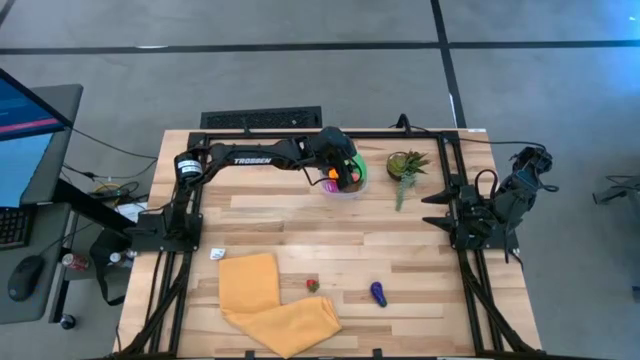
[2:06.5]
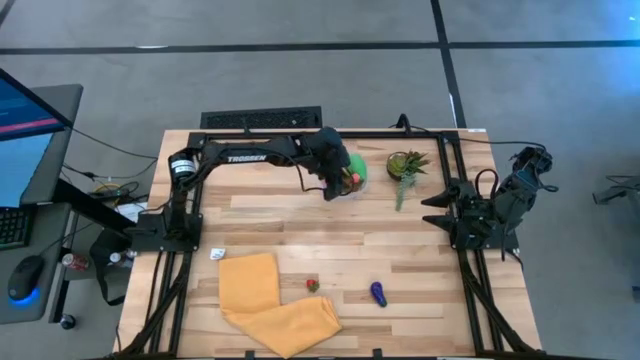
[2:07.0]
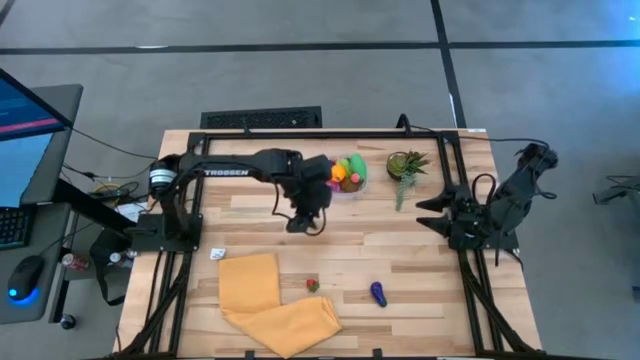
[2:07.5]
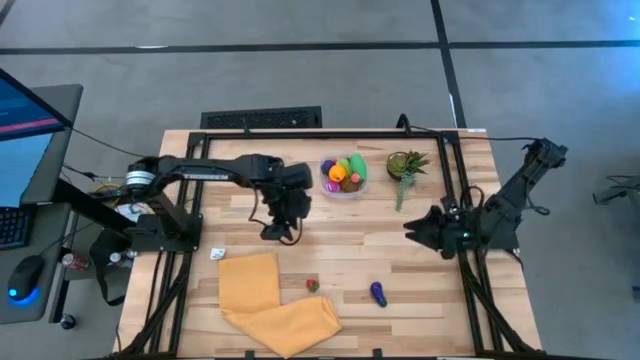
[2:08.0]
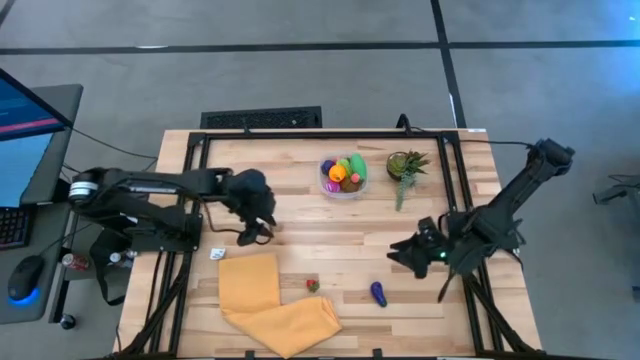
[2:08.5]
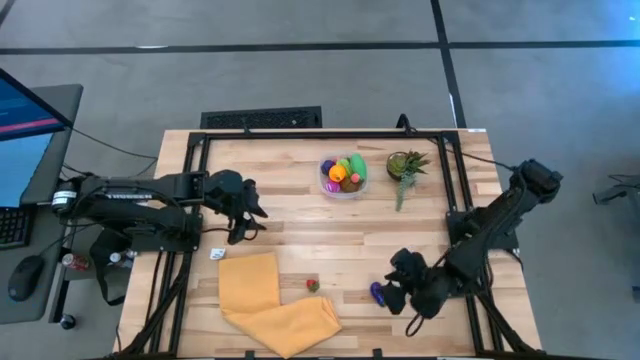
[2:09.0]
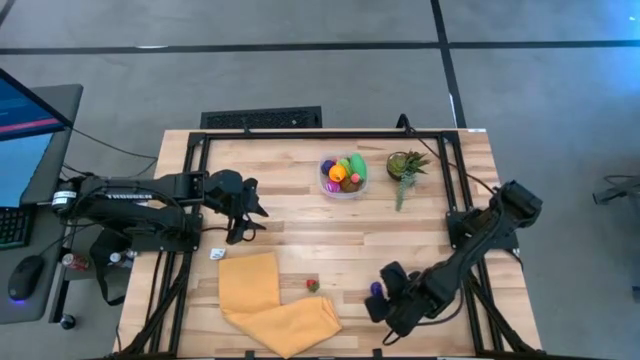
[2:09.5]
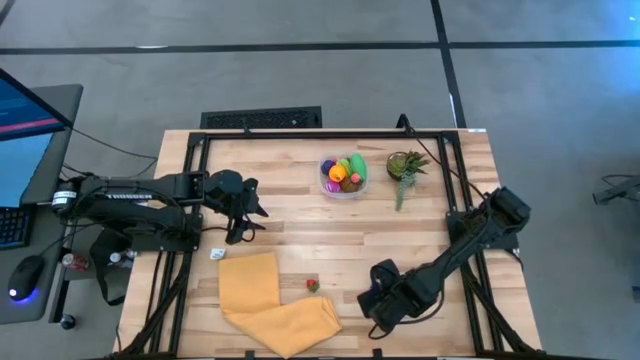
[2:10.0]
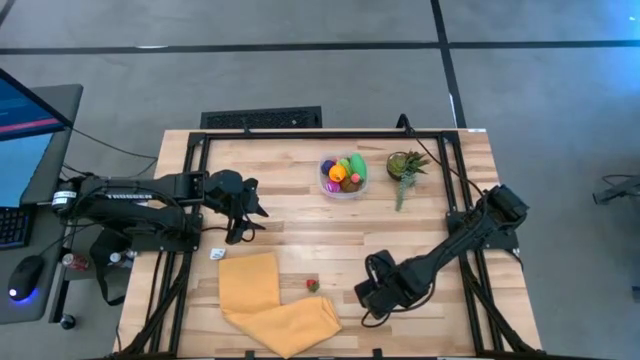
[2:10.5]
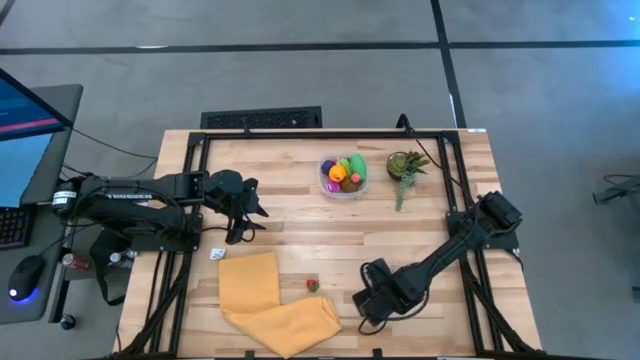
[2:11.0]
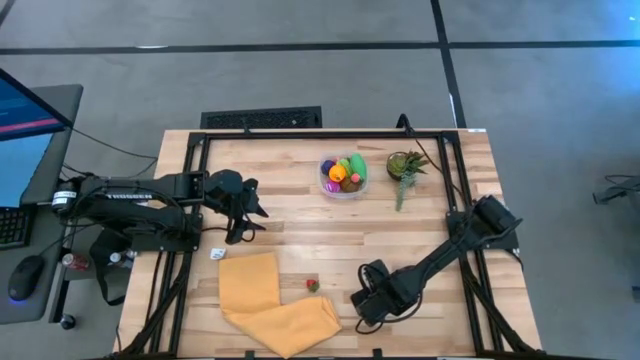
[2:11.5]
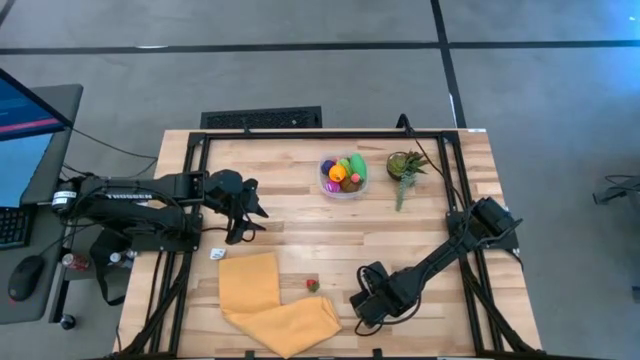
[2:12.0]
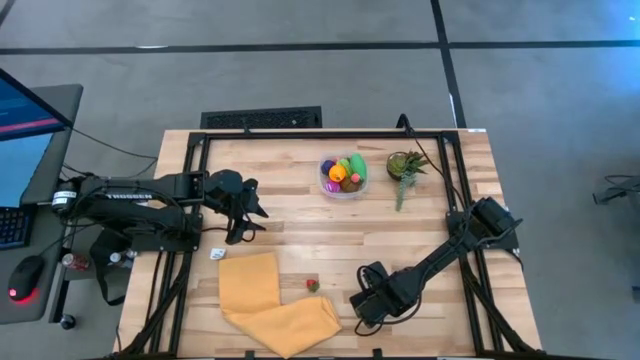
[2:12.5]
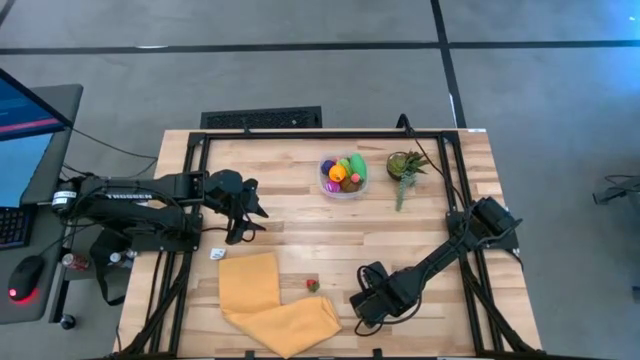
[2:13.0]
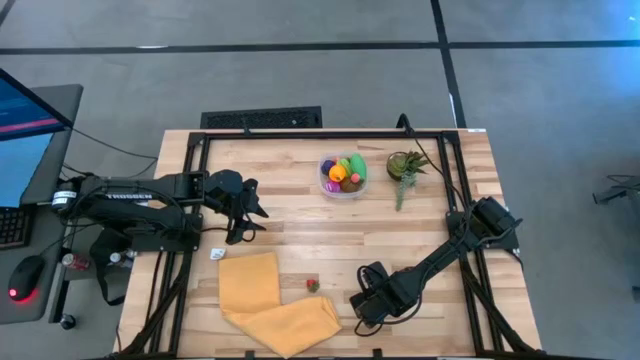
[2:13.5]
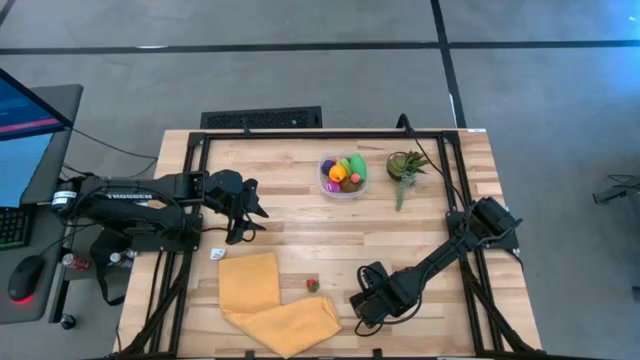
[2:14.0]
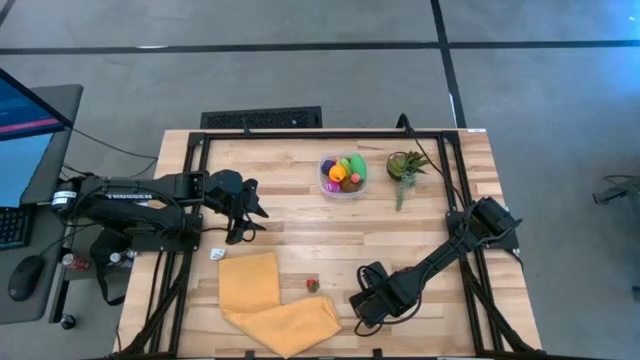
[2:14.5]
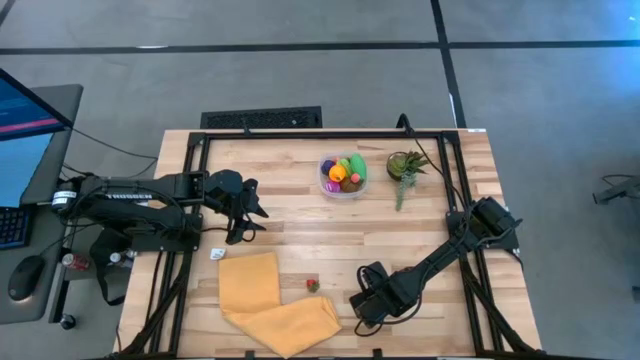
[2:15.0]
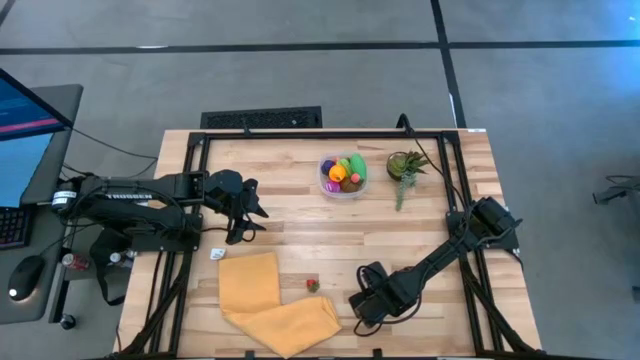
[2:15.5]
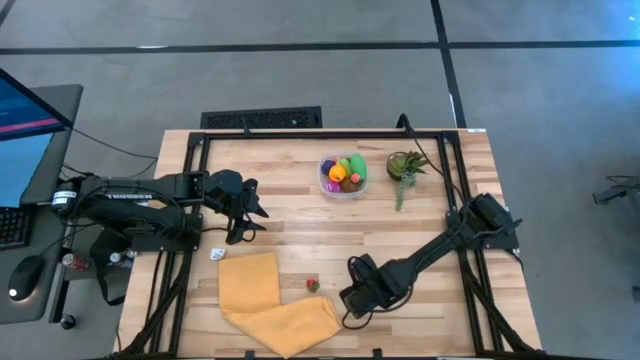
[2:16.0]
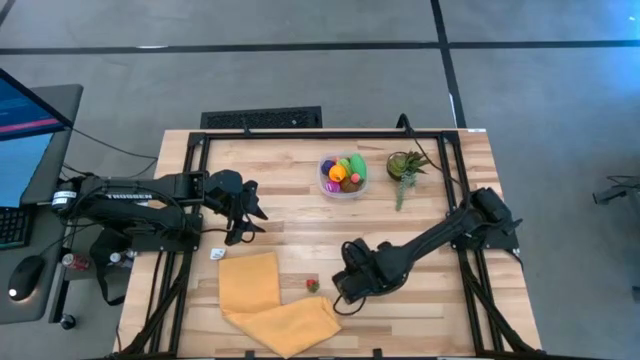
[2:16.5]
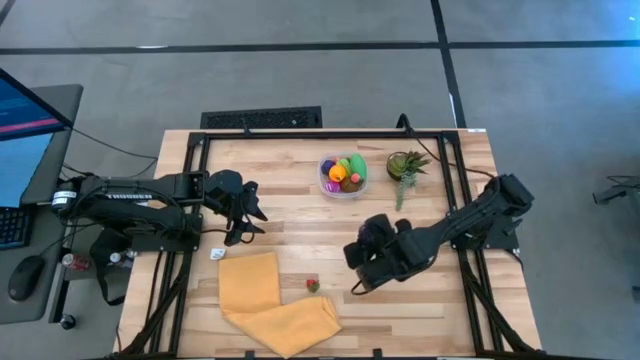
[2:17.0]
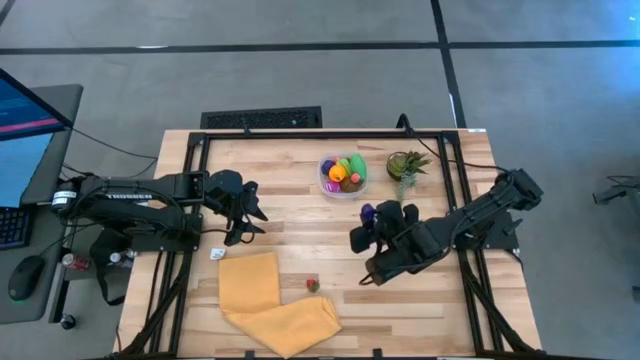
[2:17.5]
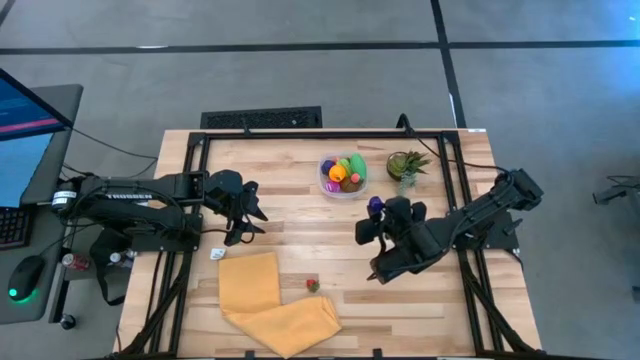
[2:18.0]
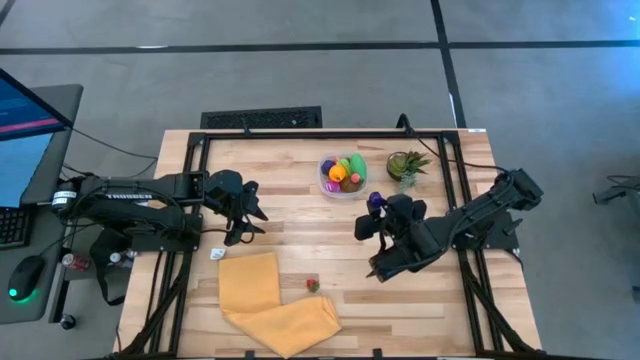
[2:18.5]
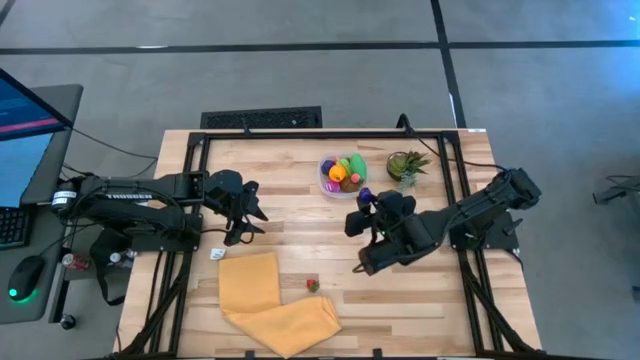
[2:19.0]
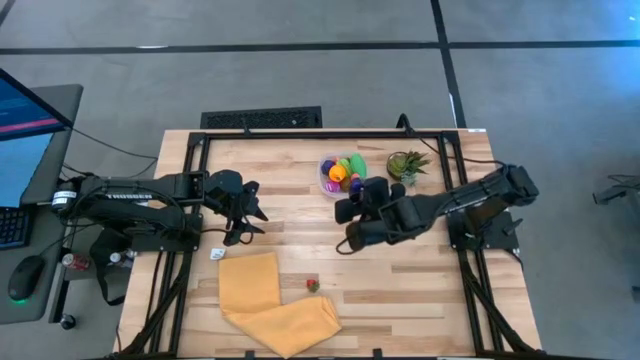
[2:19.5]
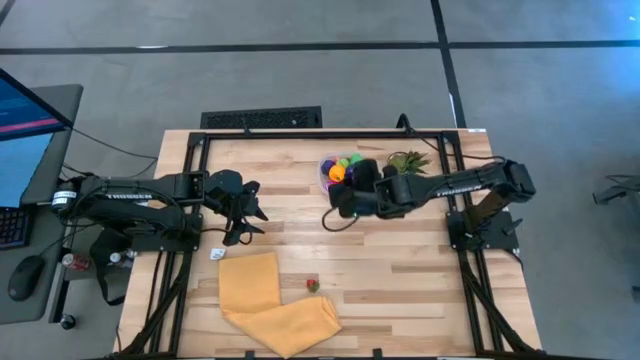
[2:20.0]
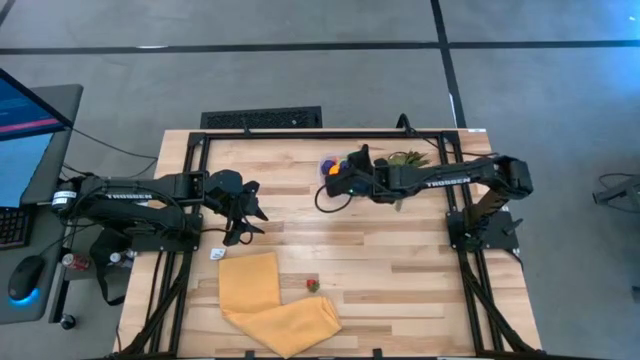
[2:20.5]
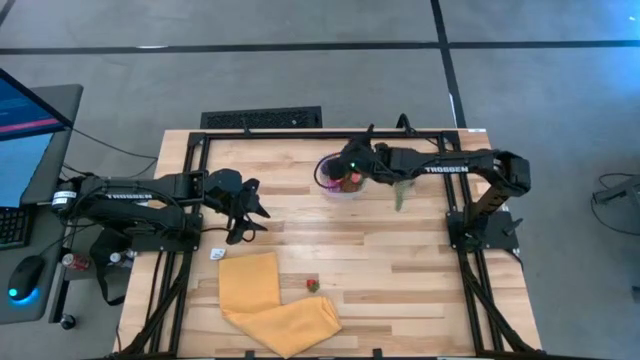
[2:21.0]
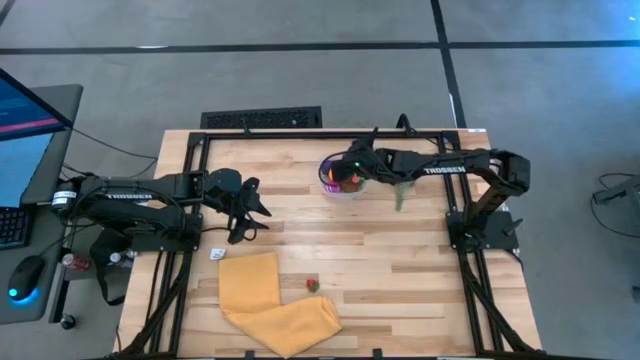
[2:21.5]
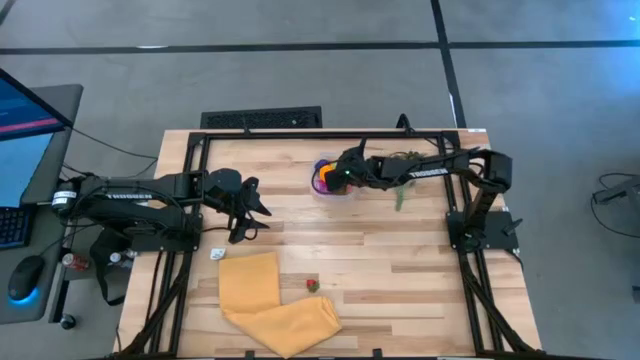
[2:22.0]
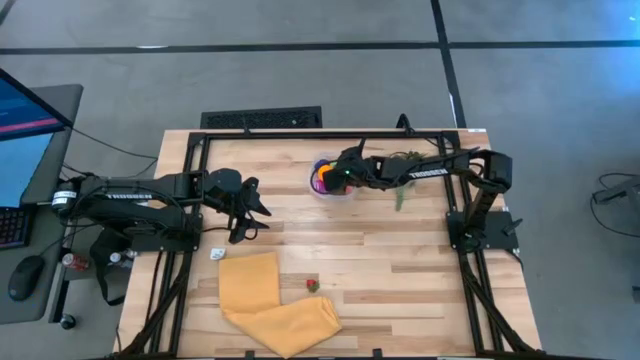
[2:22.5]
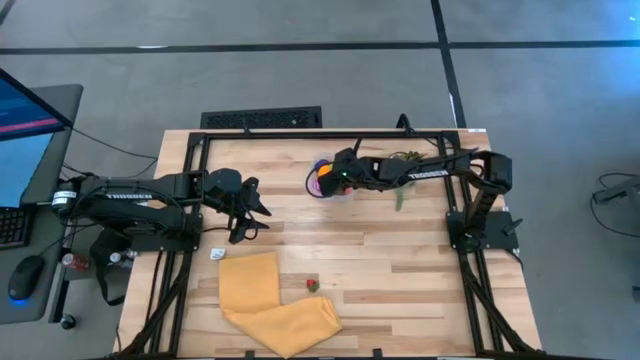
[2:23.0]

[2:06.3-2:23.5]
Task: Pick and placing Produce into tupperware
Put the eggplant in the transparent bin

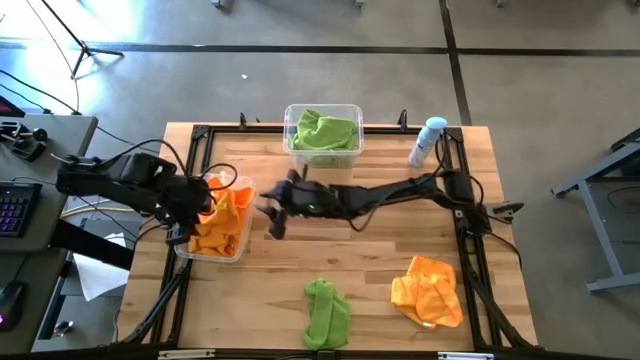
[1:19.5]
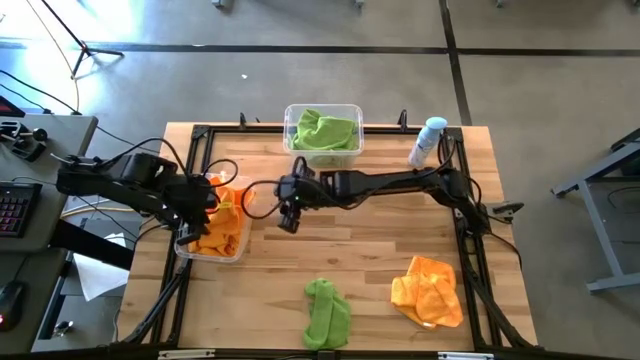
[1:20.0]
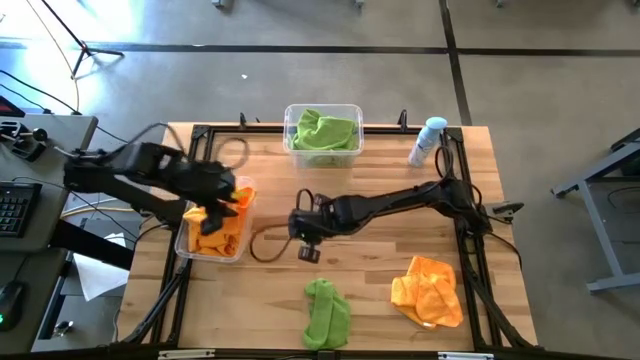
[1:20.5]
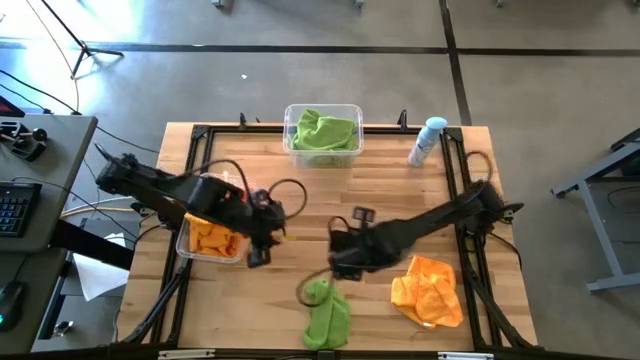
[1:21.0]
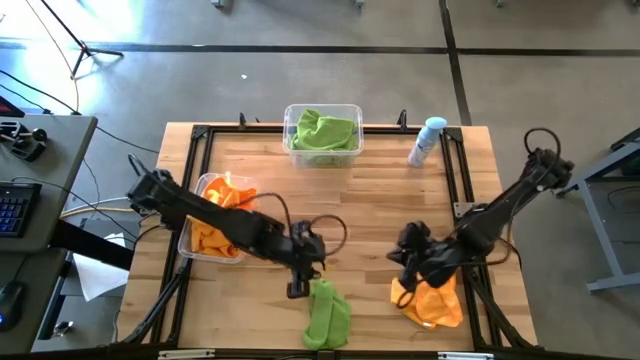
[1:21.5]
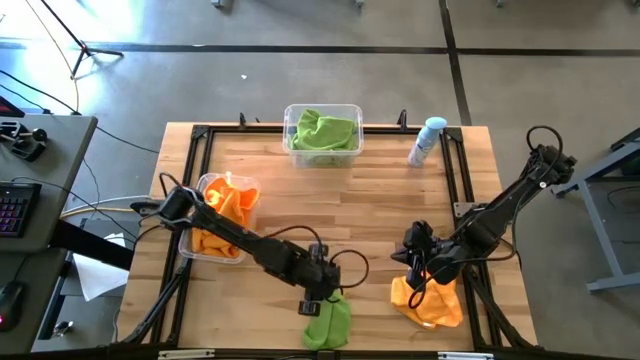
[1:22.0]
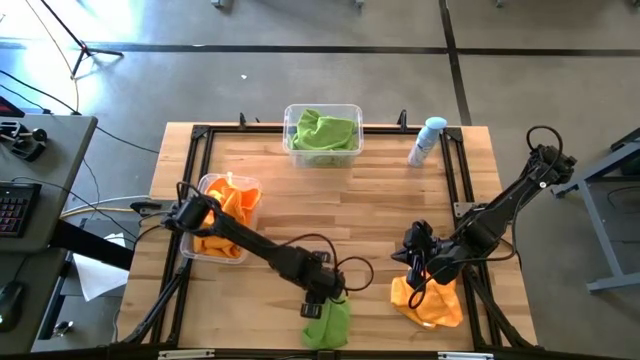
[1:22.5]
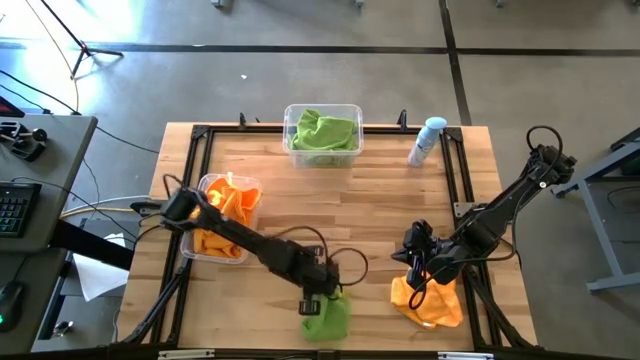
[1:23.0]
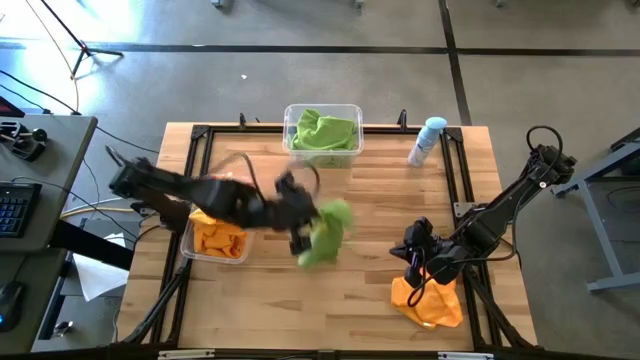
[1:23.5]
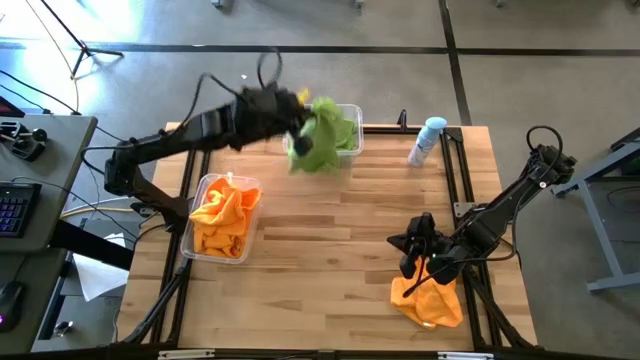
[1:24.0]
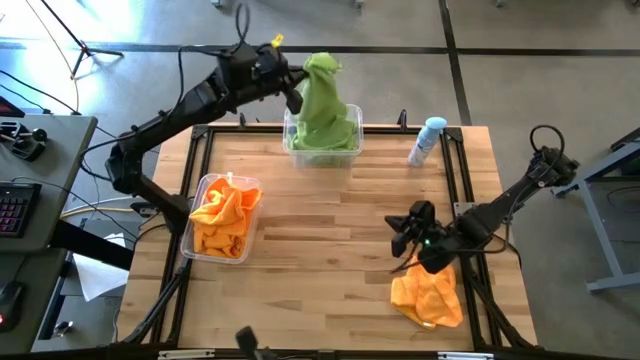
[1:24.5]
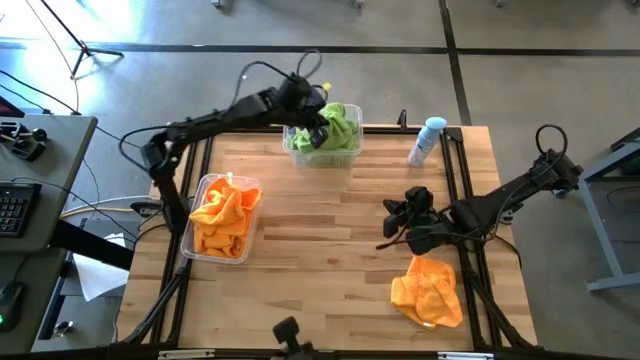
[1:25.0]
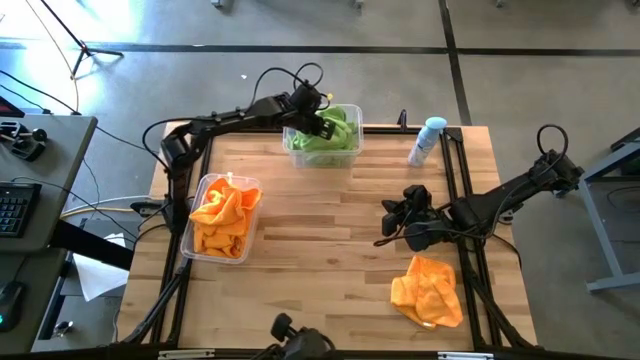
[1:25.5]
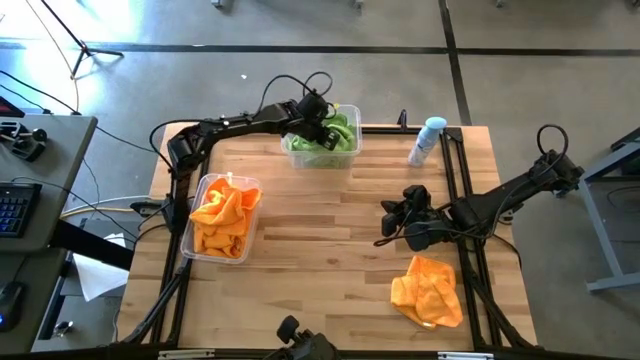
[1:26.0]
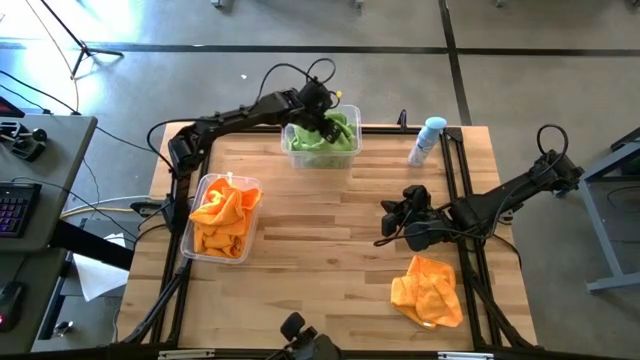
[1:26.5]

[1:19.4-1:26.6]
Task: Sort microfiber towel by color & place in baskets
Put the green microfiber towel into the top transparent bin
